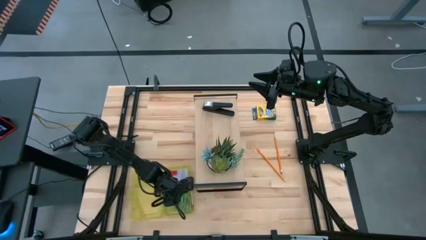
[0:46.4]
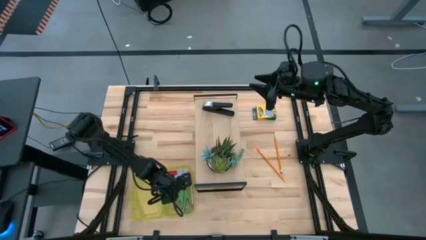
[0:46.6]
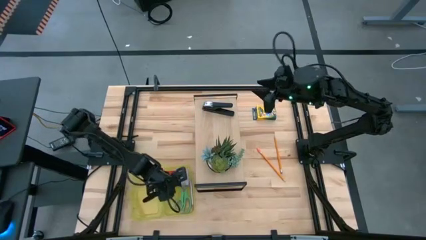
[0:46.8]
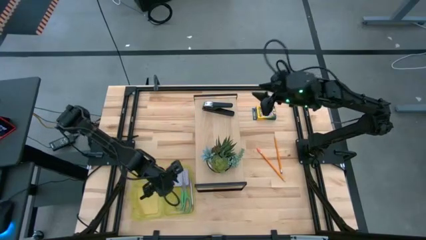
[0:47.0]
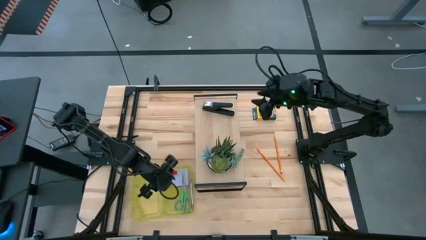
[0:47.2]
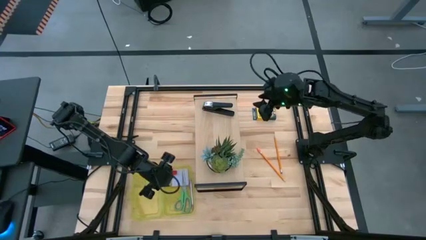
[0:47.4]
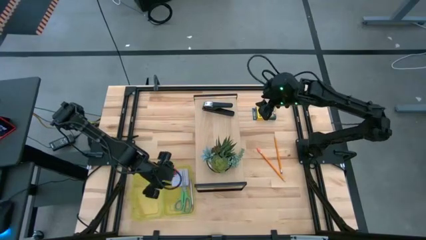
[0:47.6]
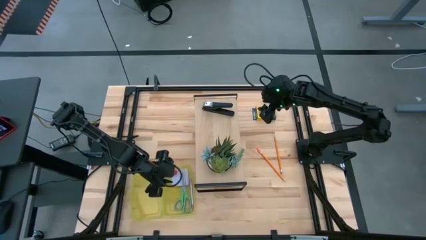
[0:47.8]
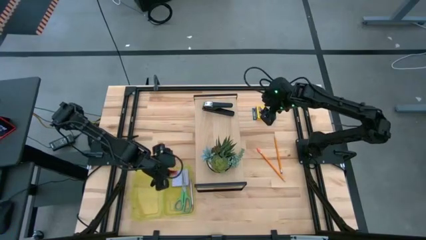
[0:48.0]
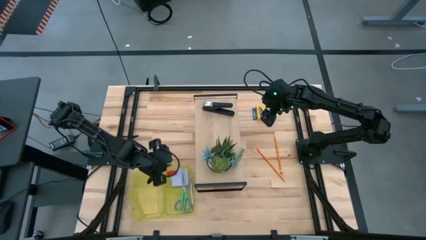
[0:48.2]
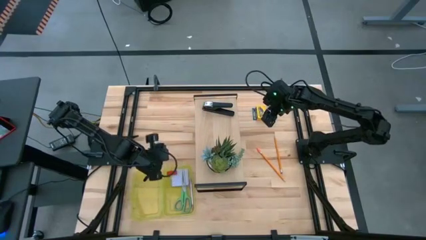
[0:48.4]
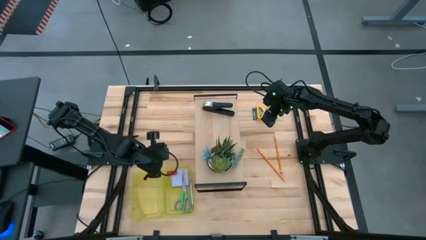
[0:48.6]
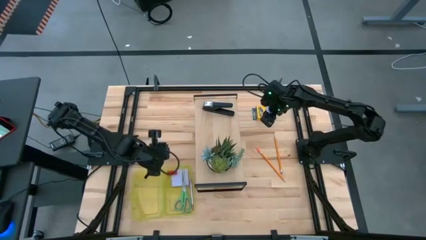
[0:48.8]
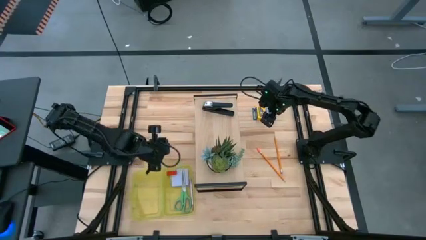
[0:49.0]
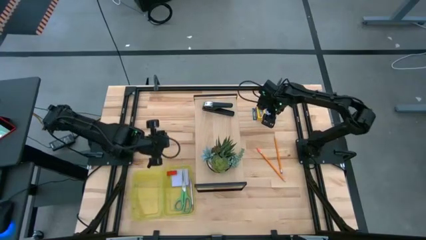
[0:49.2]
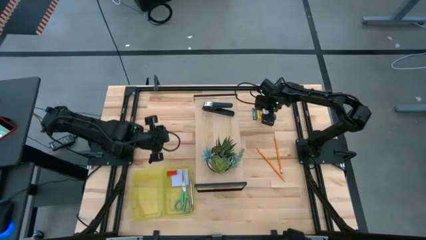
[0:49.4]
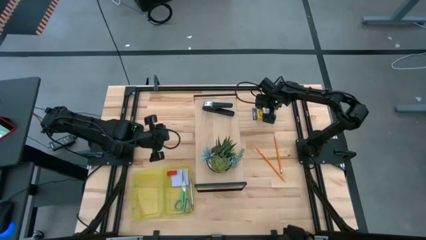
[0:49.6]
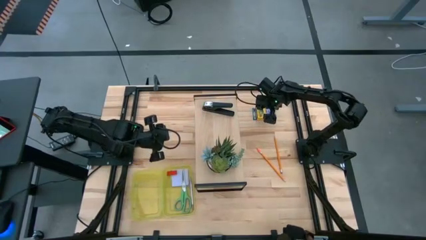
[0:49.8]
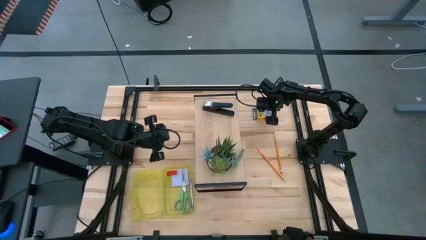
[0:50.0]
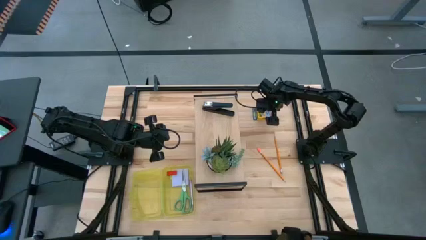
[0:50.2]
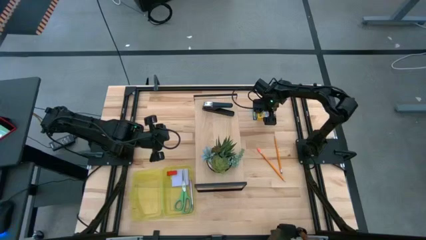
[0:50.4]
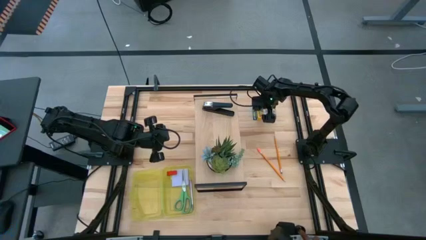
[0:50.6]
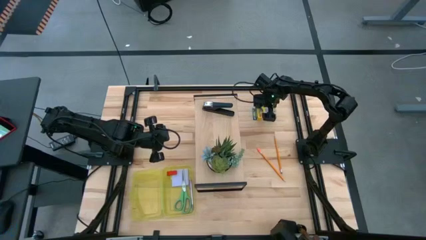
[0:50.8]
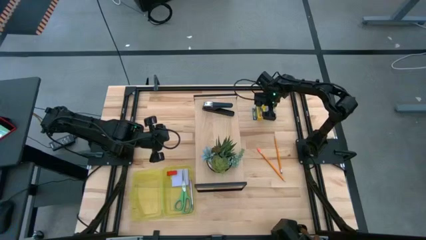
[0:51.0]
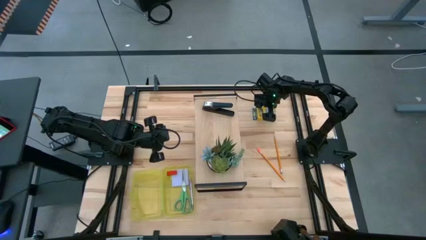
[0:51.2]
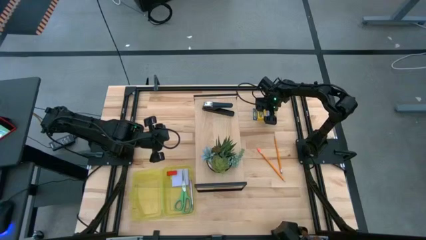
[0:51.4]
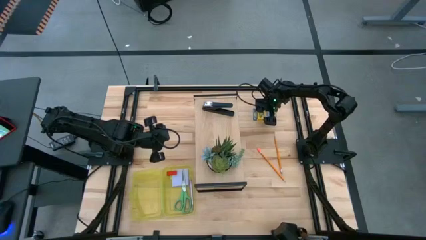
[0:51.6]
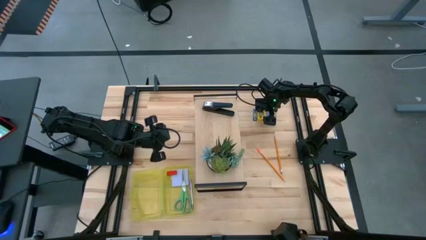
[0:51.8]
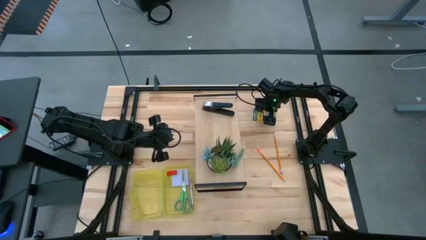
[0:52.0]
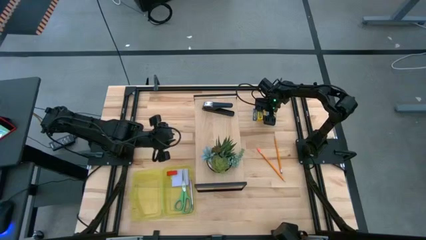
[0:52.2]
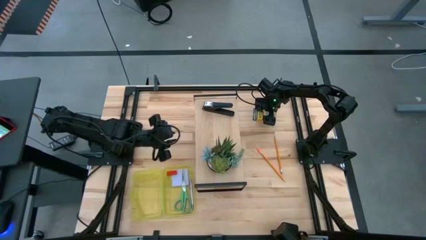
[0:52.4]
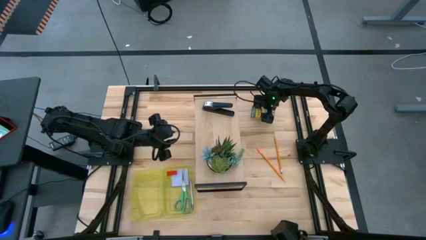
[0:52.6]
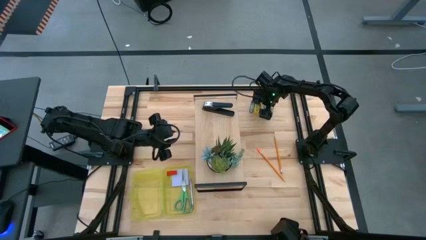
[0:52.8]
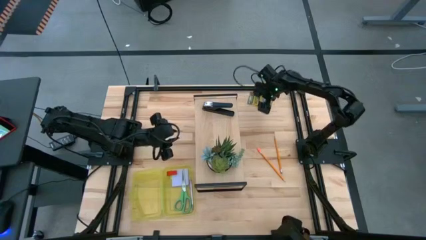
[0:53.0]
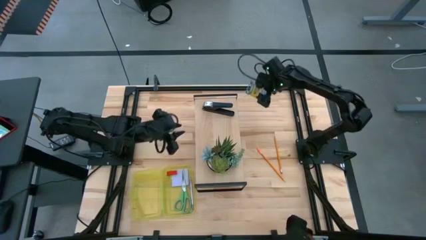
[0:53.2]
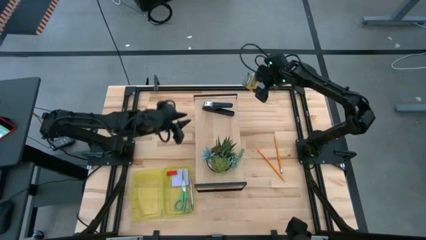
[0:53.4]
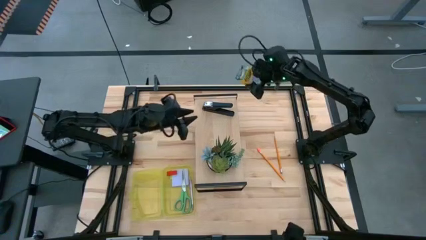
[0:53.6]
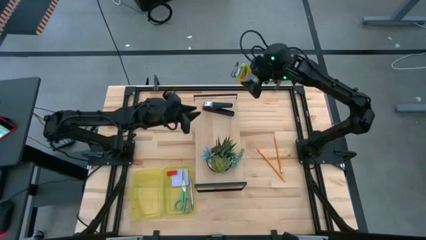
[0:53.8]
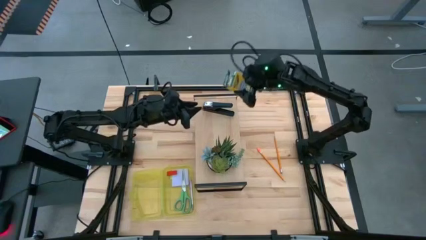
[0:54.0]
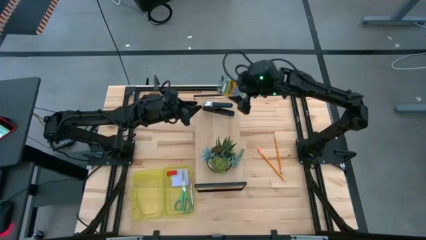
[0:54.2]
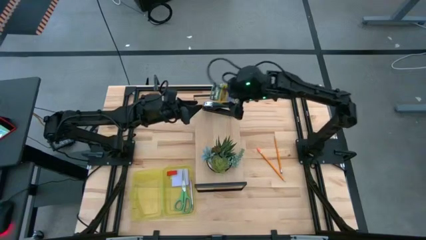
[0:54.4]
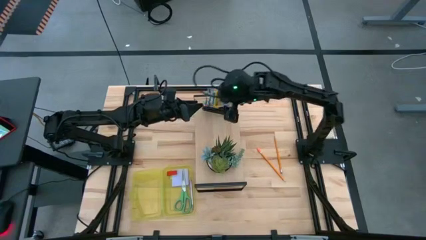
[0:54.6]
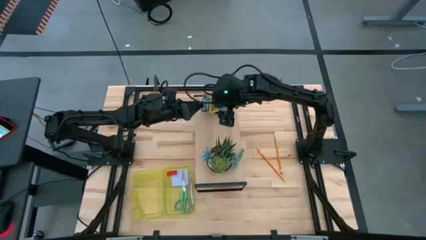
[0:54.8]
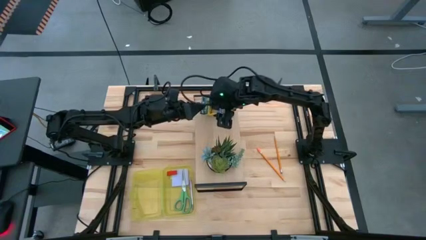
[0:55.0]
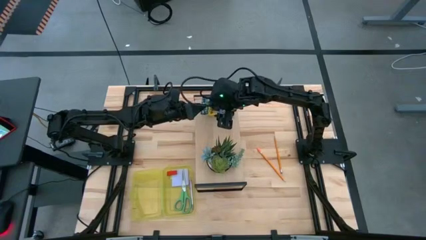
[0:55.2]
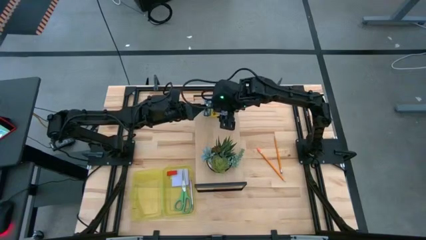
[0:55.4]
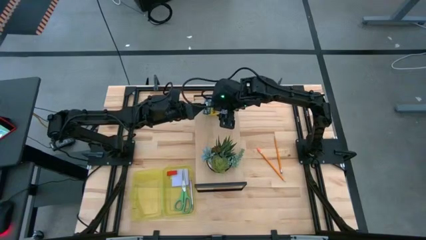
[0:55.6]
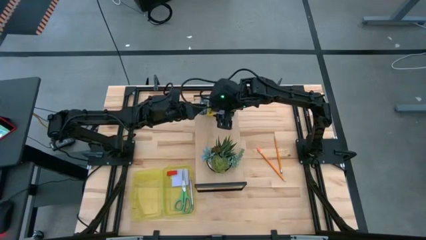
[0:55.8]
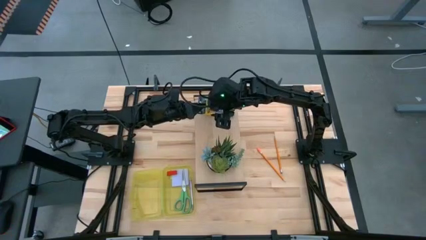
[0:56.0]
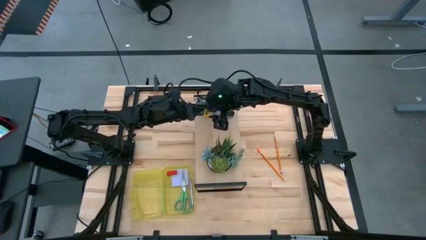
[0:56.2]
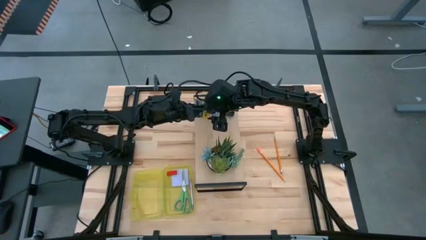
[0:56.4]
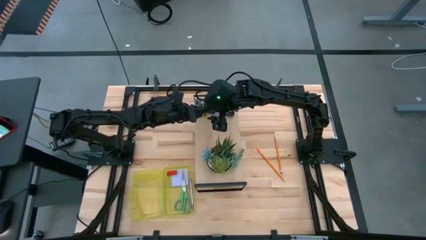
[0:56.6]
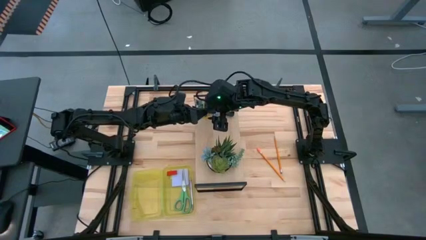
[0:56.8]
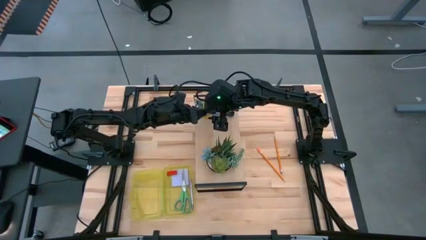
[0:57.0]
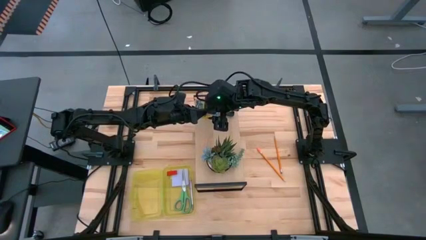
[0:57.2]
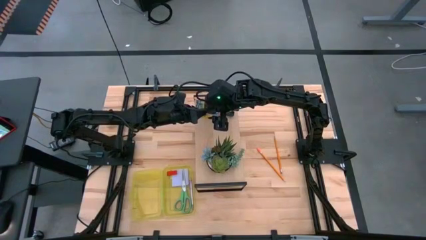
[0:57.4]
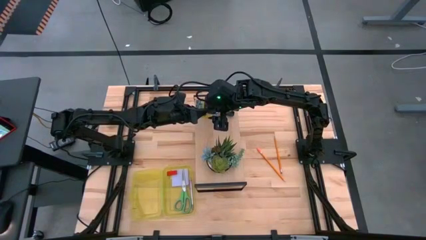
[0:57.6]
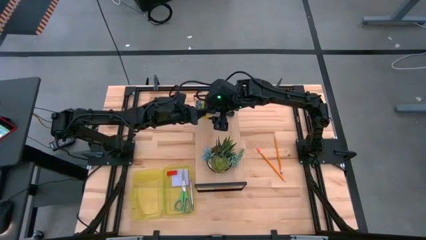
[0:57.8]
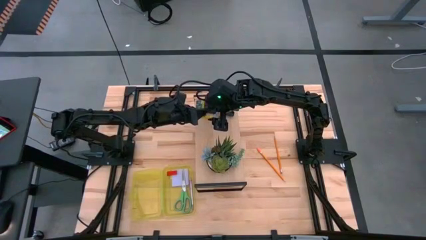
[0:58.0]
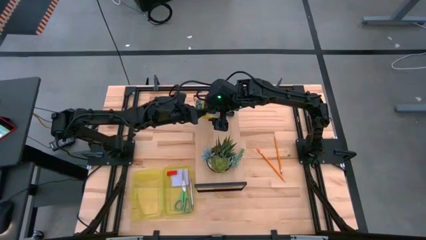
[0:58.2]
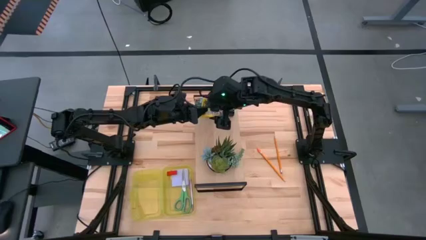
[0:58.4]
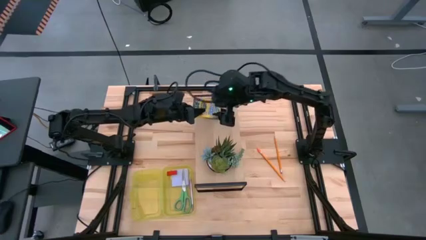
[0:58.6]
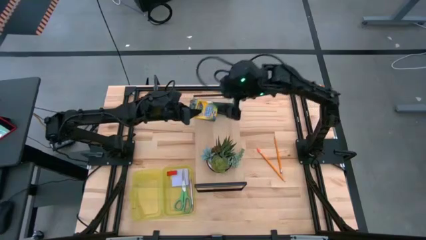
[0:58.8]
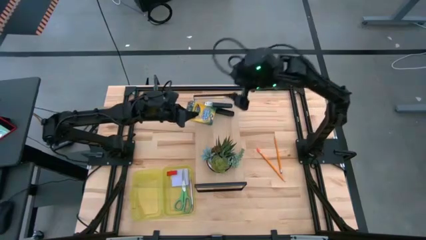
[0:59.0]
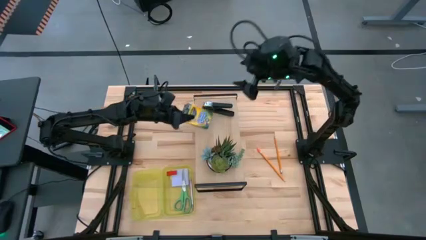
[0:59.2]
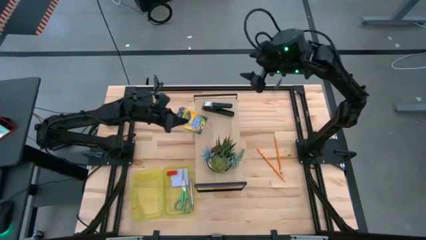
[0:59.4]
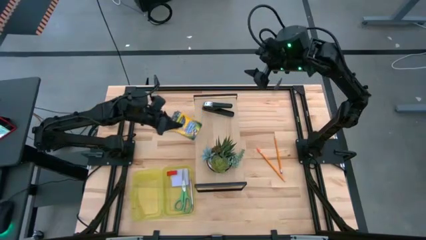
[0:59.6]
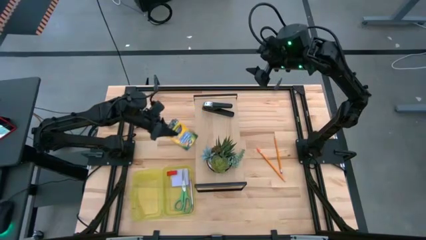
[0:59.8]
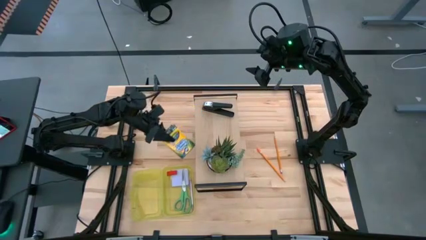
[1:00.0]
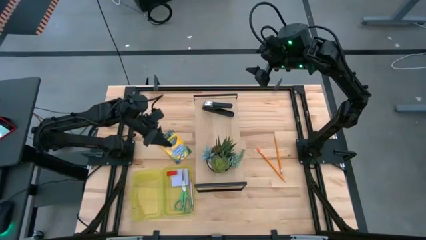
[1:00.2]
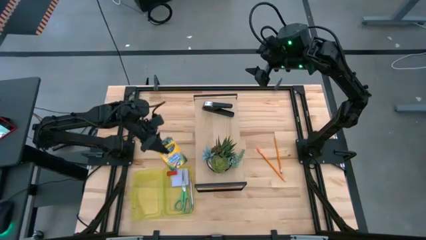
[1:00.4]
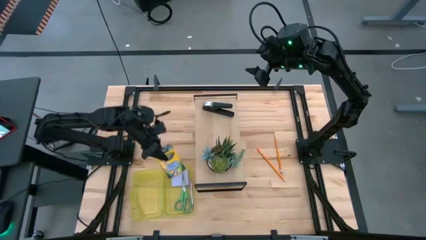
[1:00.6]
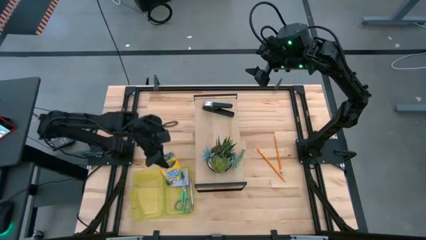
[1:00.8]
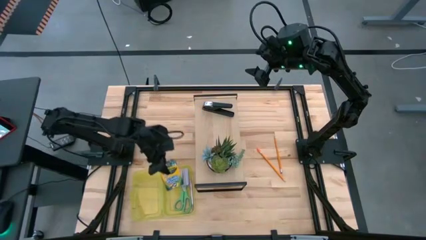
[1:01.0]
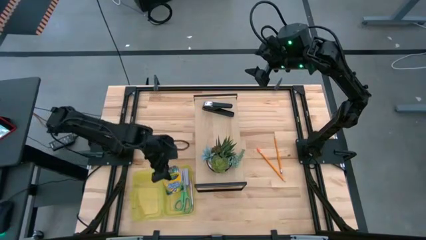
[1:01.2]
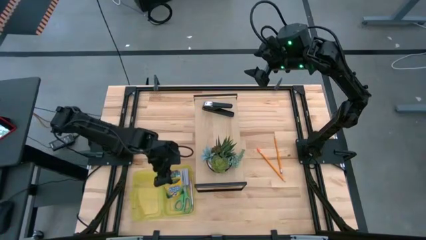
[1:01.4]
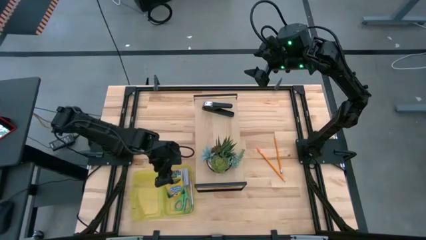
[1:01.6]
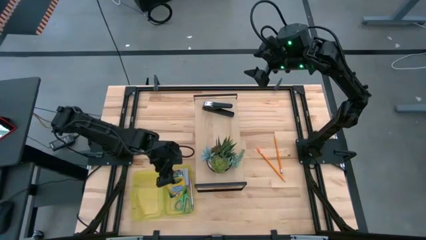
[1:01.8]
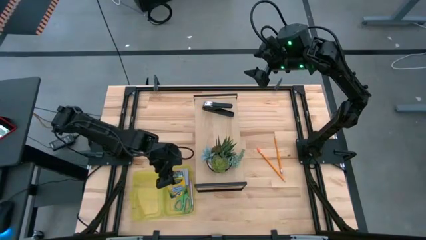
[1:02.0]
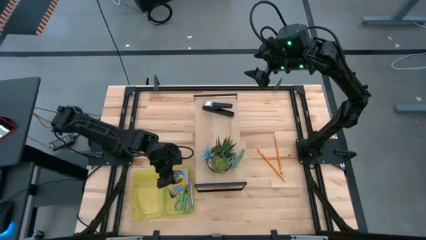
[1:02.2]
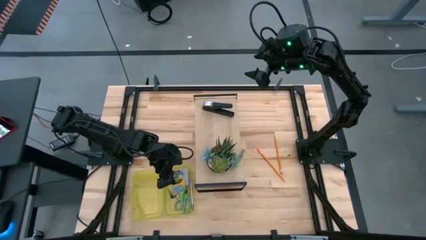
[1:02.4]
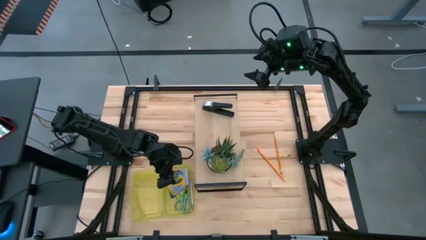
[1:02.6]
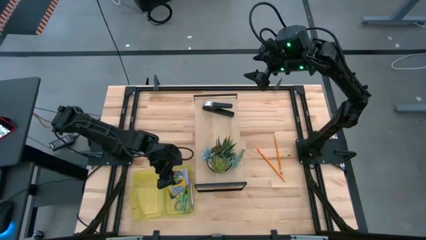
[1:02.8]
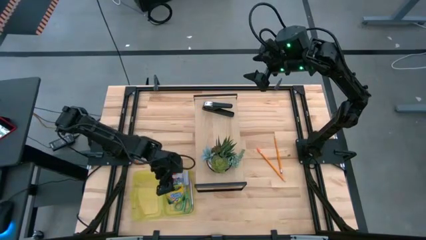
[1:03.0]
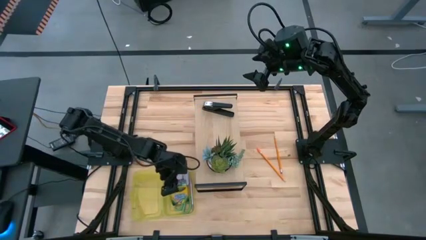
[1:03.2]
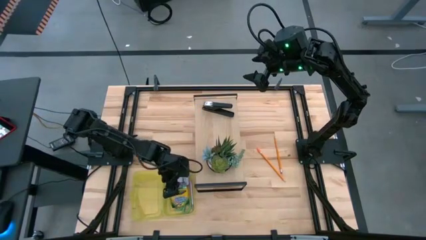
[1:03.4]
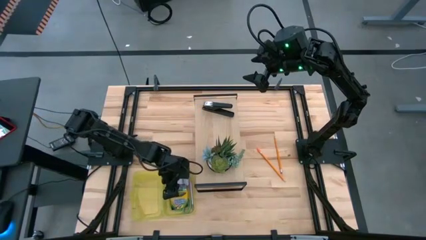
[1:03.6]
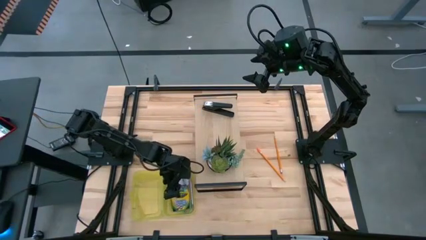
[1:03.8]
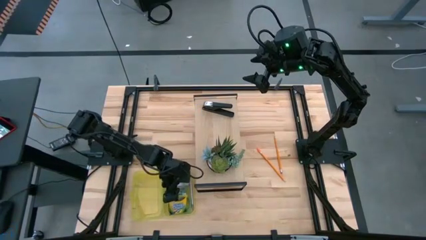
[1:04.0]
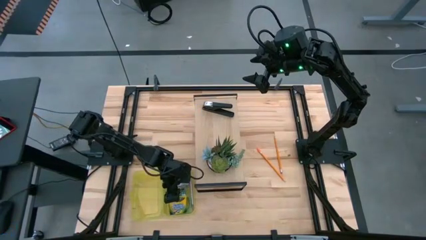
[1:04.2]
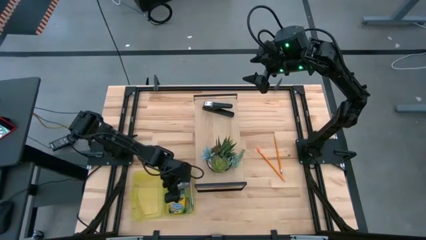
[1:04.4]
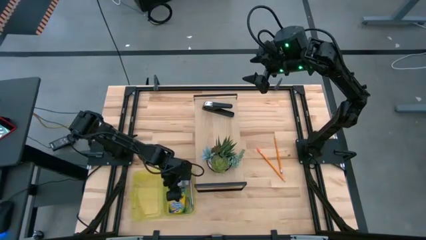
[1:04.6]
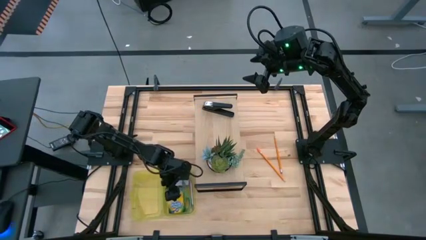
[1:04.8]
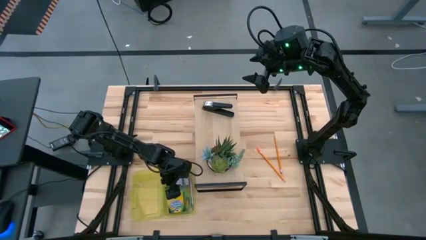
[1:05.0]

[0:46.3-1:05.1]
Task: Pack school essentials
Put the box of crayons into the yellow supply box
